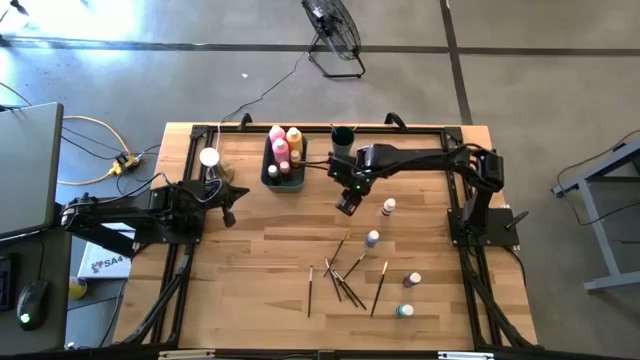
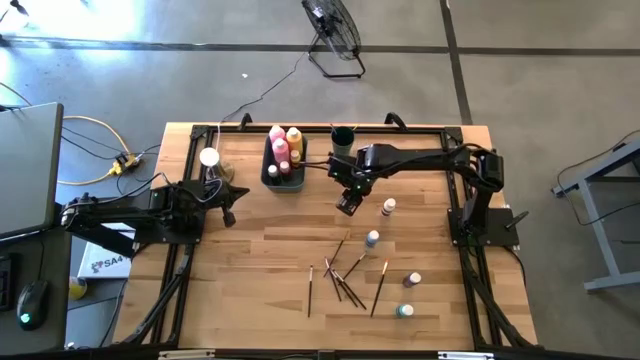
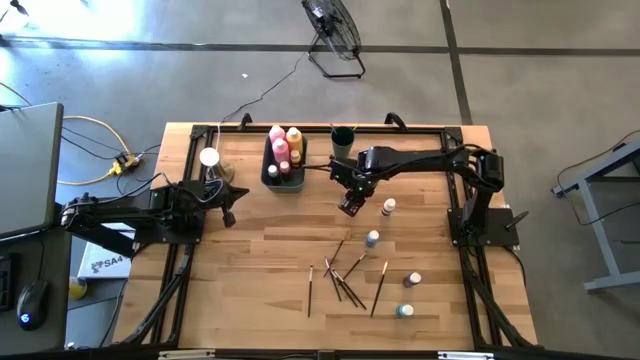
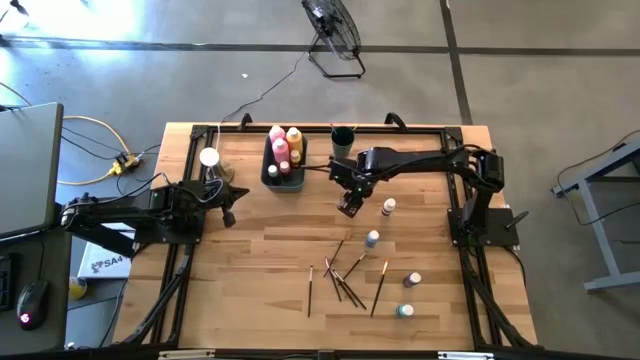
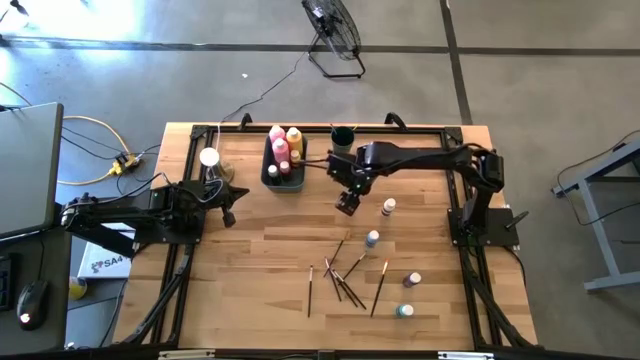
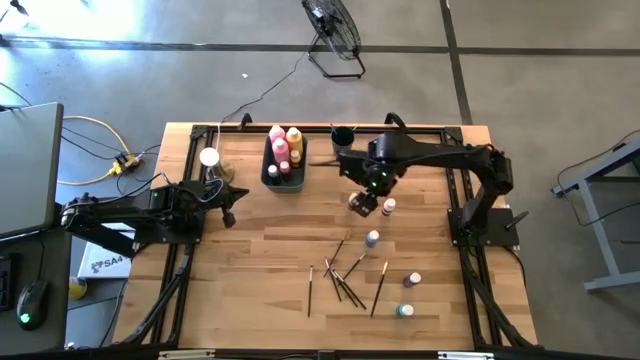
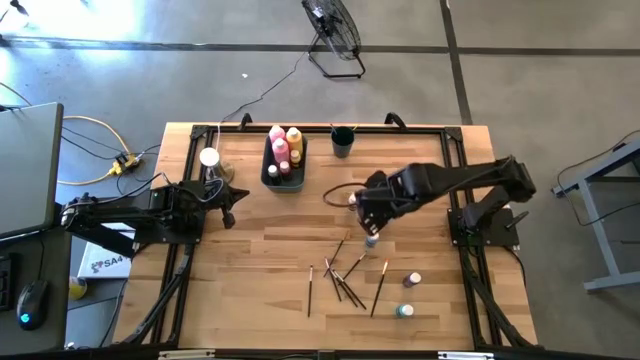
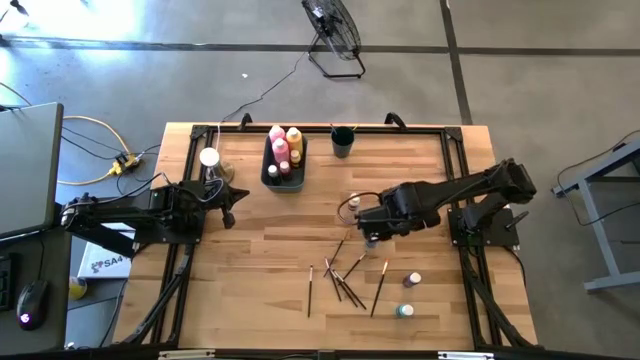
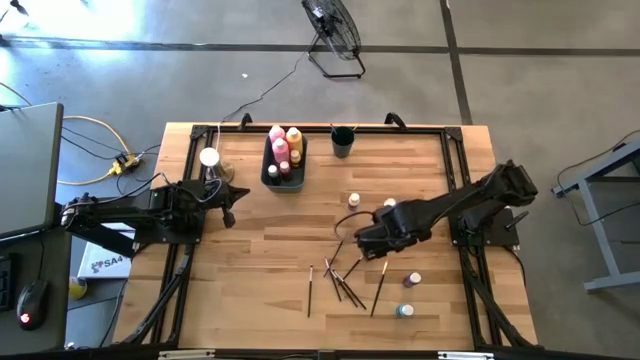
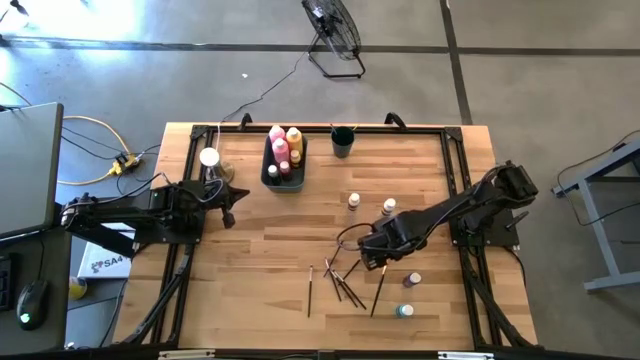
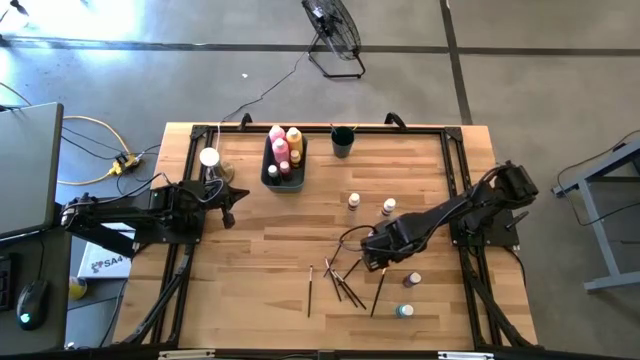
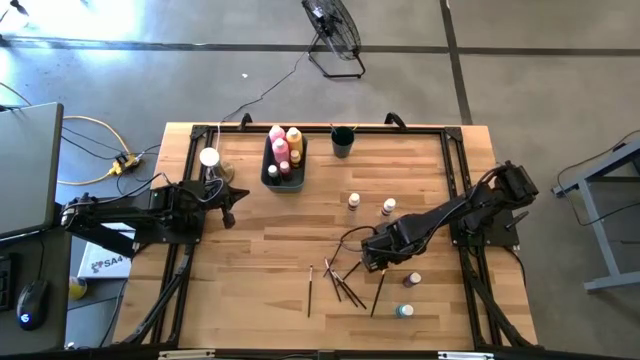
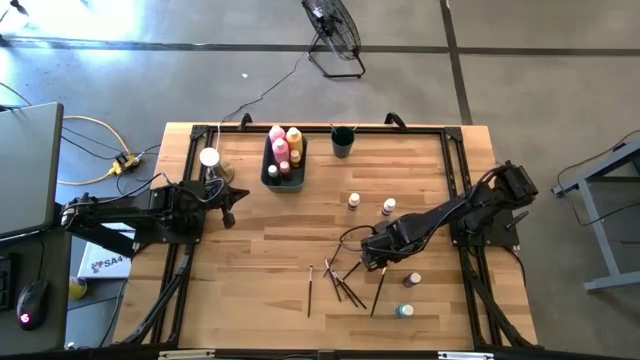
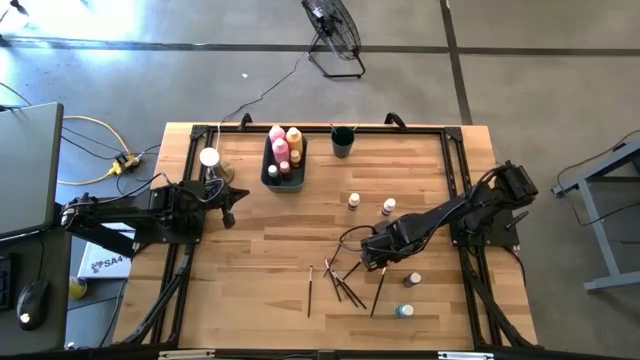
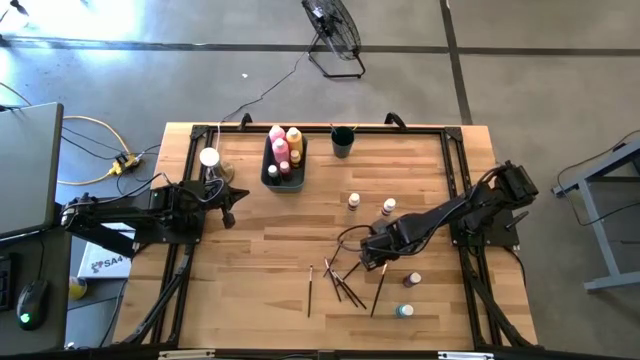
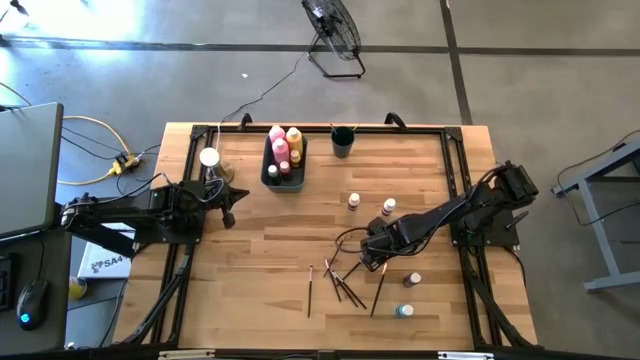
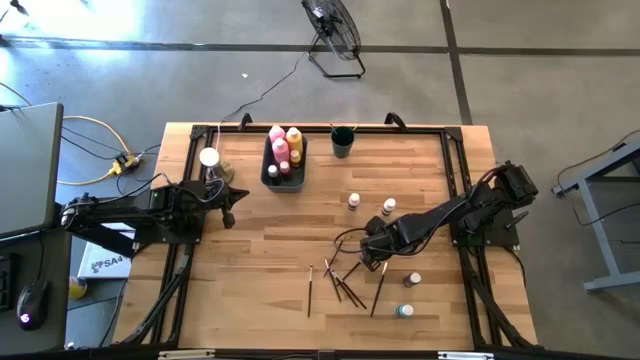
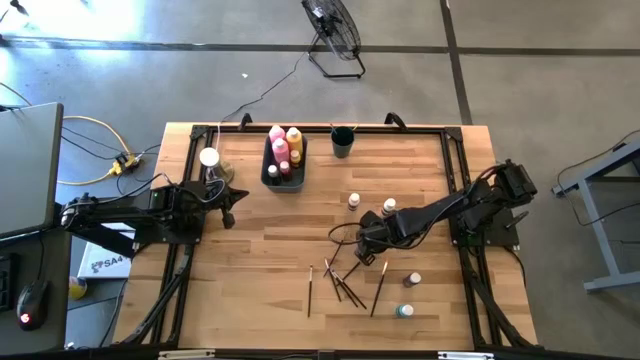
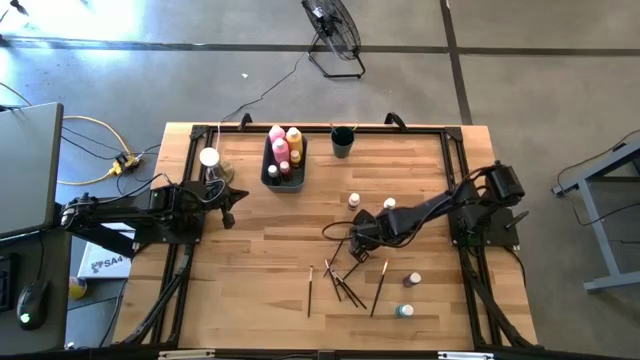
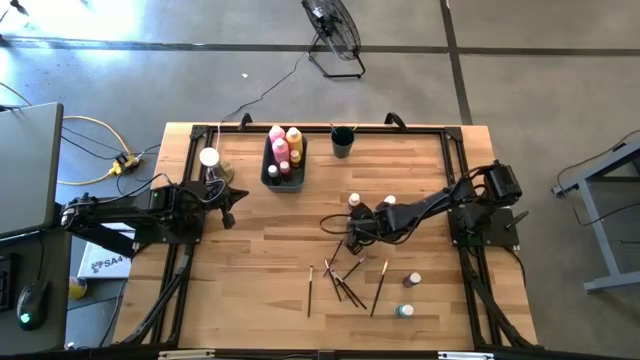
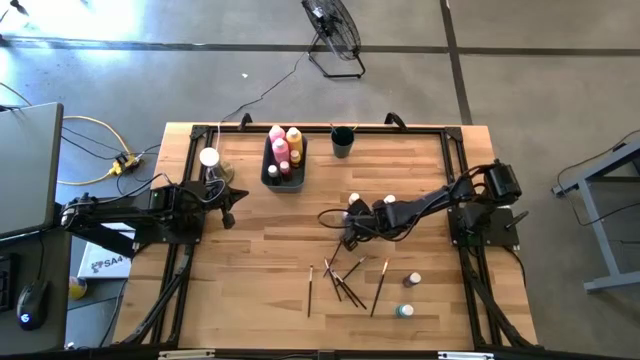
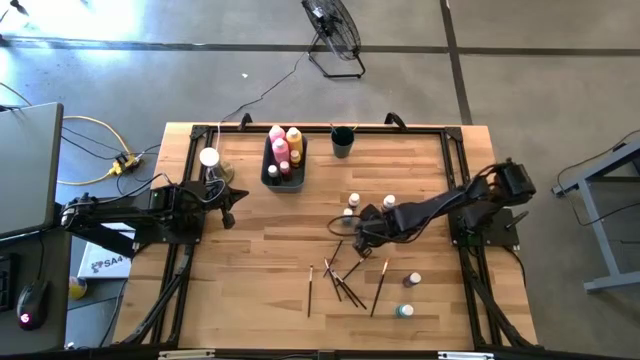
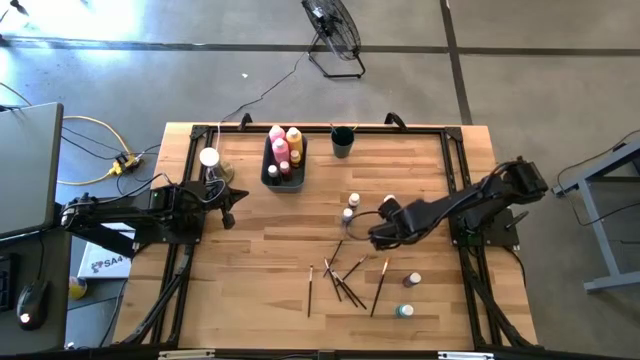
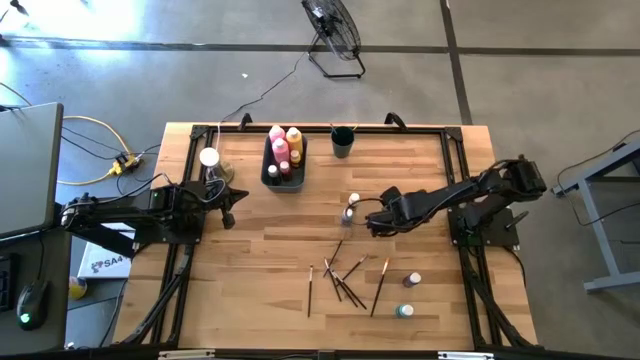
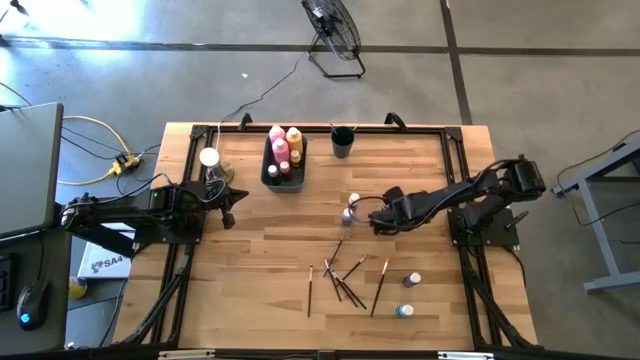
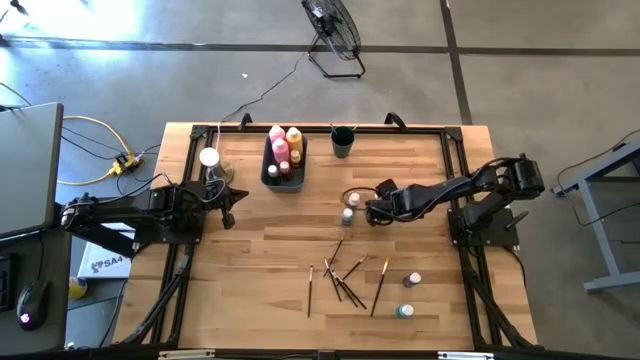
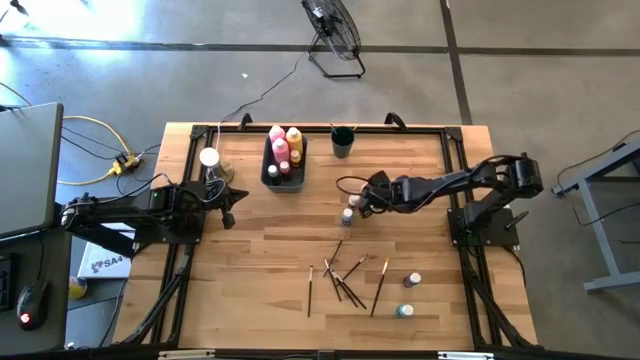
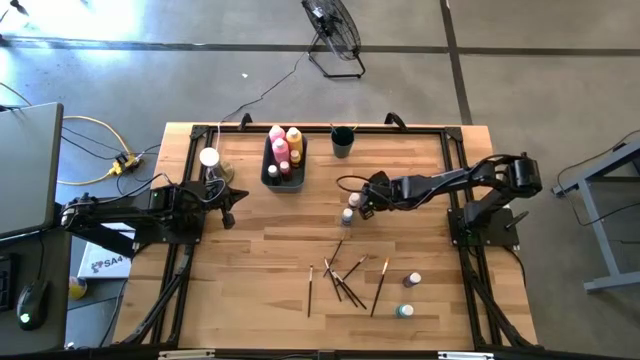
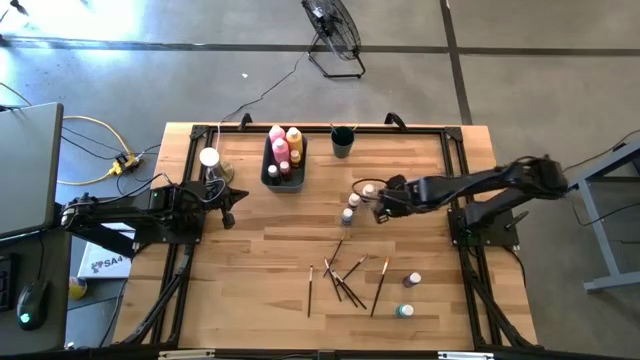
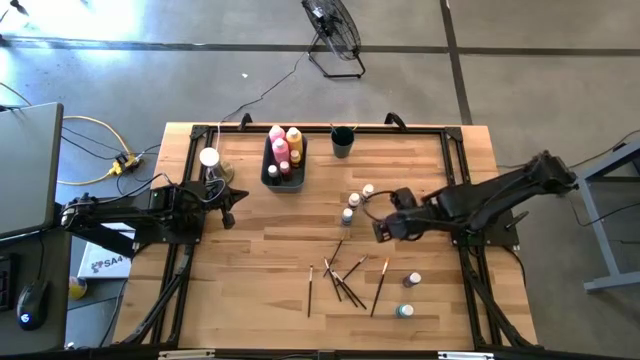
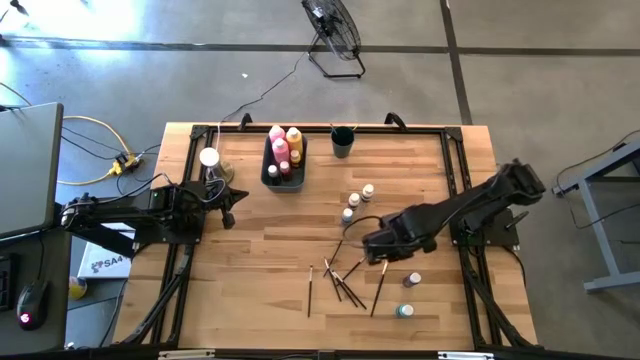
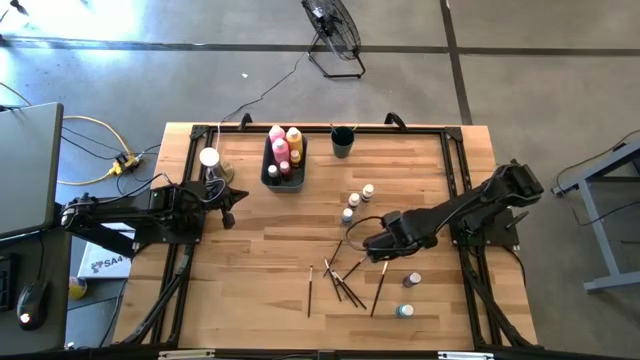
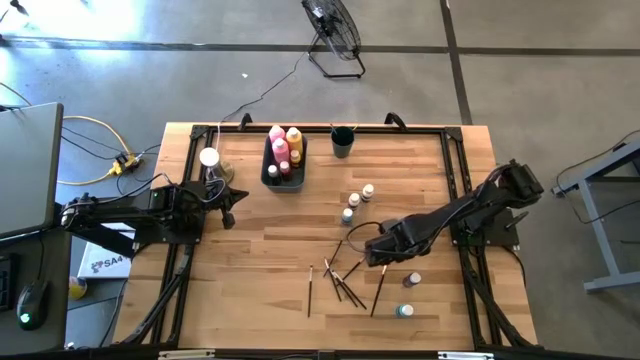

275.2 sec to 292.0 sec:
Task: Pick & Place Paint Supplies
Adjust the paint bottles
